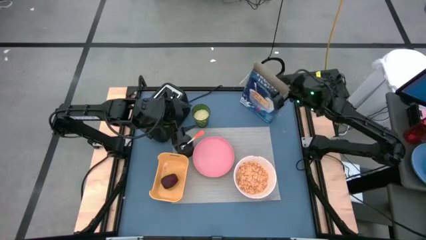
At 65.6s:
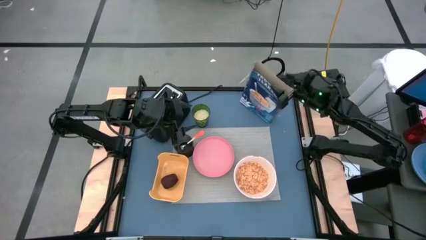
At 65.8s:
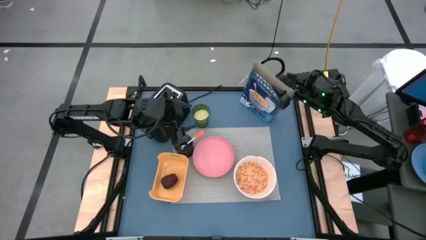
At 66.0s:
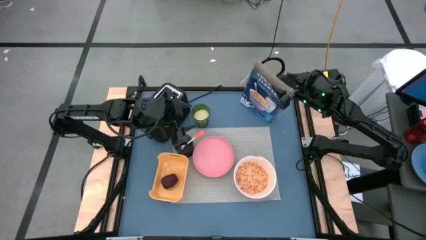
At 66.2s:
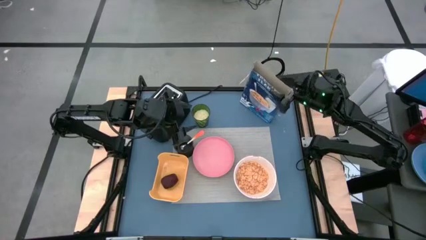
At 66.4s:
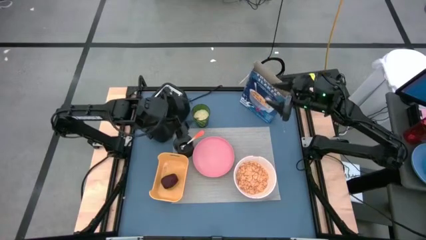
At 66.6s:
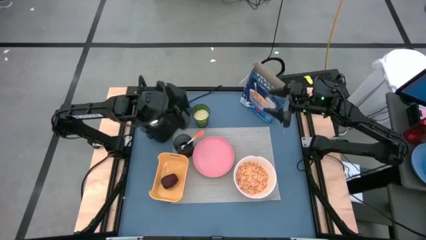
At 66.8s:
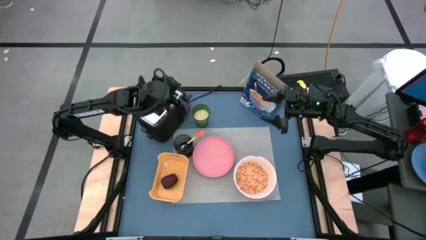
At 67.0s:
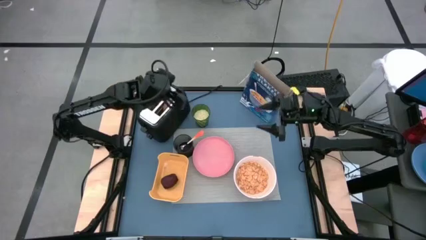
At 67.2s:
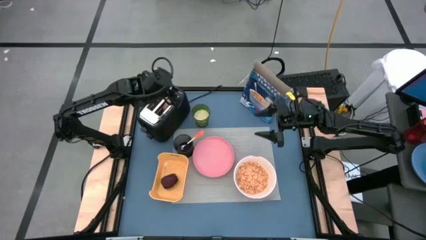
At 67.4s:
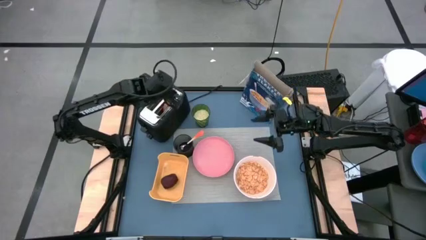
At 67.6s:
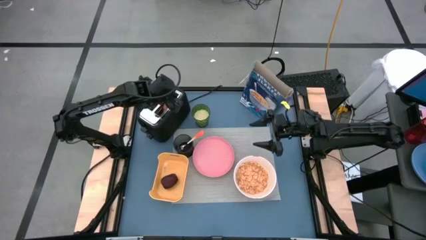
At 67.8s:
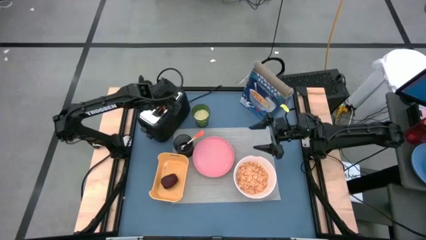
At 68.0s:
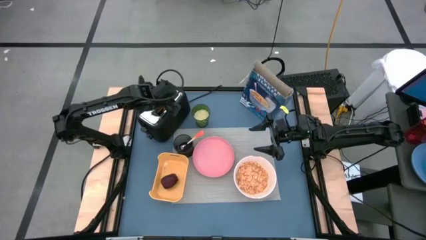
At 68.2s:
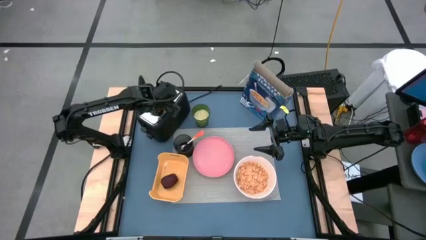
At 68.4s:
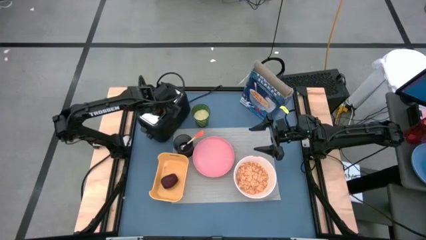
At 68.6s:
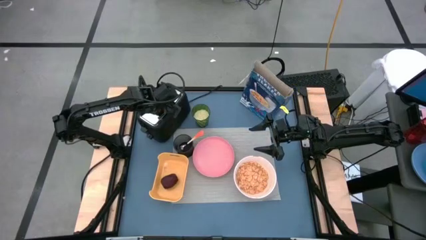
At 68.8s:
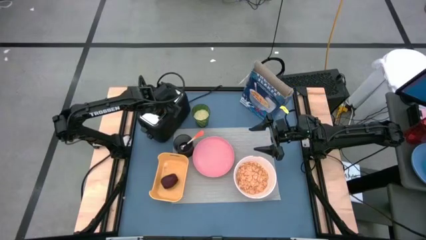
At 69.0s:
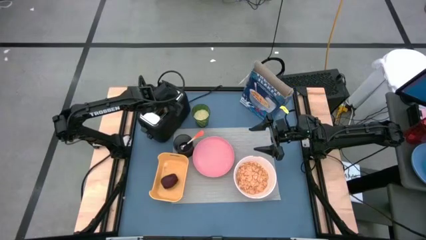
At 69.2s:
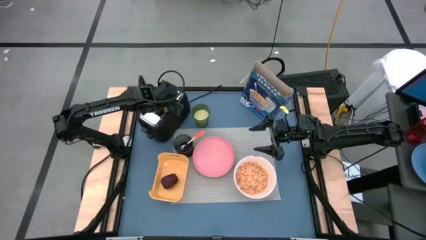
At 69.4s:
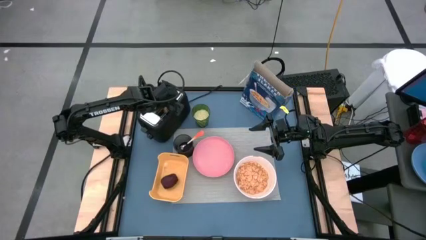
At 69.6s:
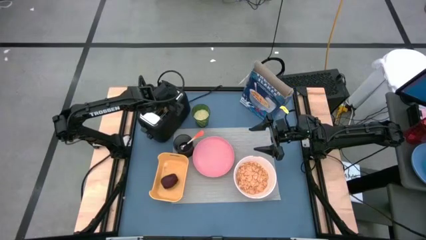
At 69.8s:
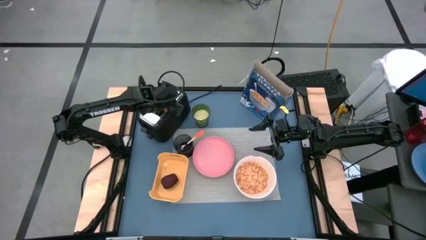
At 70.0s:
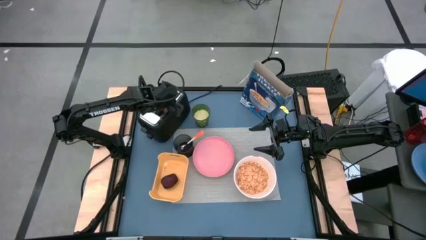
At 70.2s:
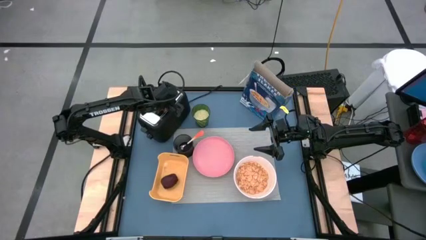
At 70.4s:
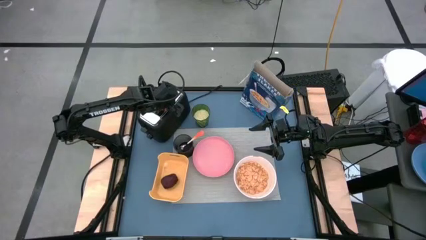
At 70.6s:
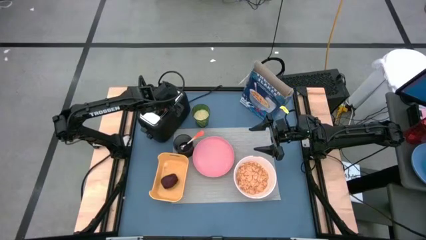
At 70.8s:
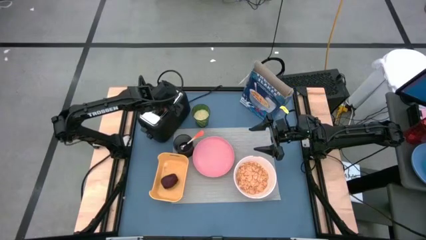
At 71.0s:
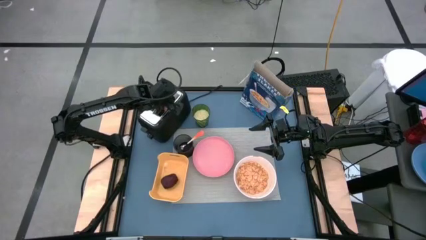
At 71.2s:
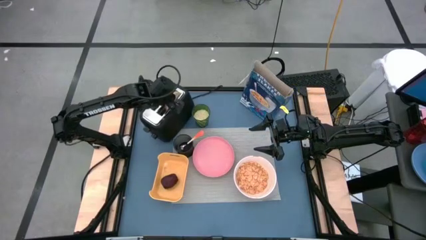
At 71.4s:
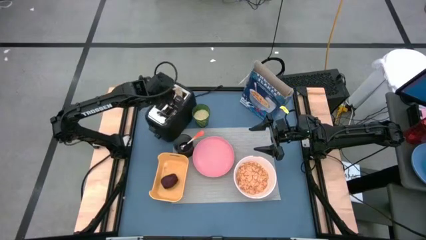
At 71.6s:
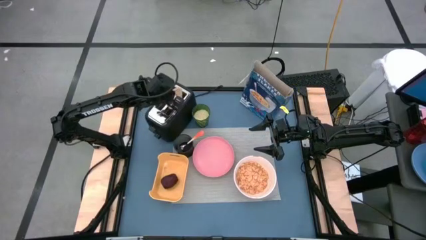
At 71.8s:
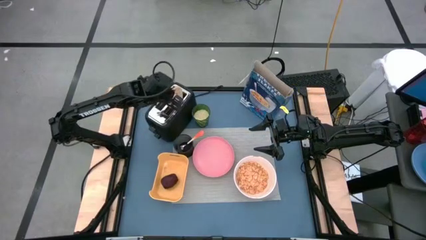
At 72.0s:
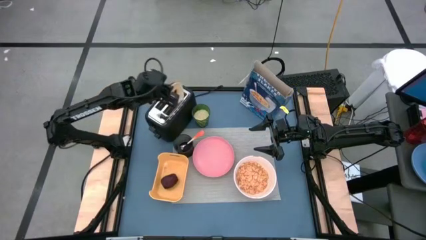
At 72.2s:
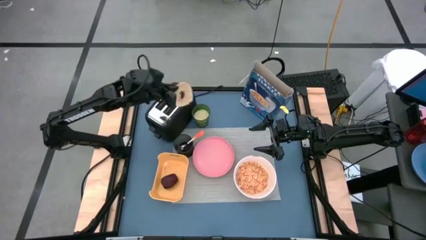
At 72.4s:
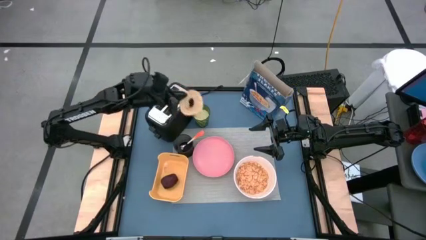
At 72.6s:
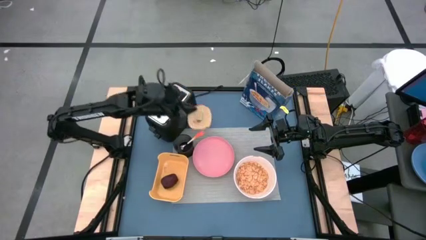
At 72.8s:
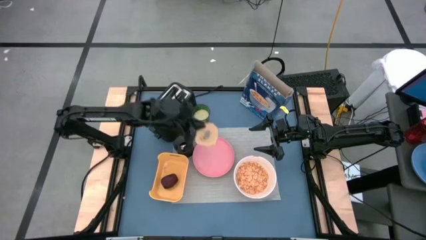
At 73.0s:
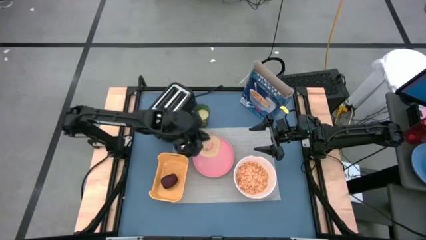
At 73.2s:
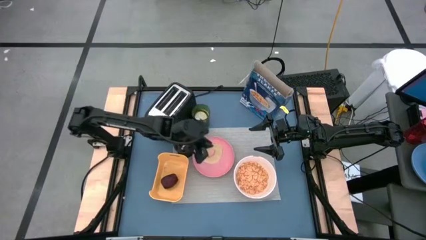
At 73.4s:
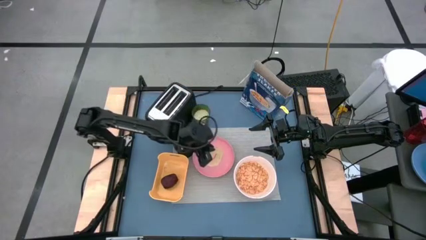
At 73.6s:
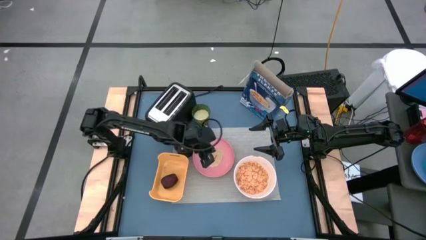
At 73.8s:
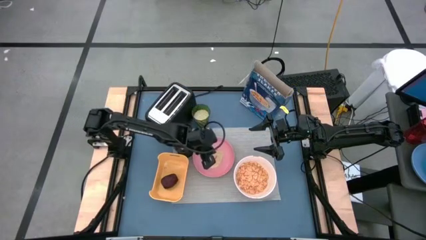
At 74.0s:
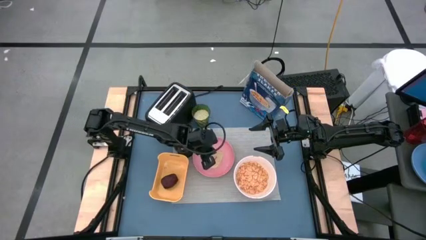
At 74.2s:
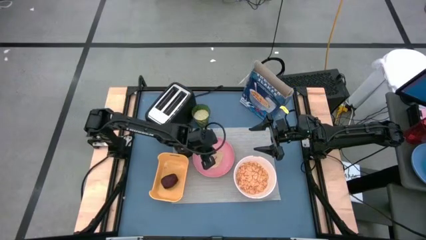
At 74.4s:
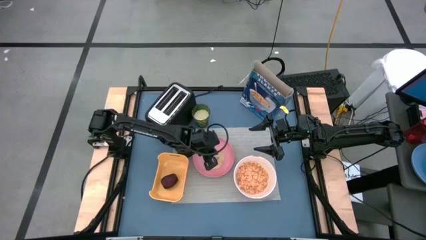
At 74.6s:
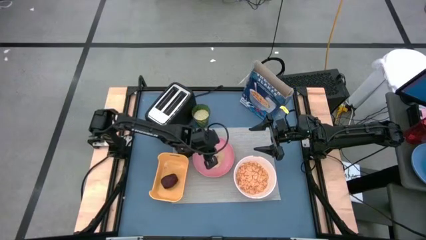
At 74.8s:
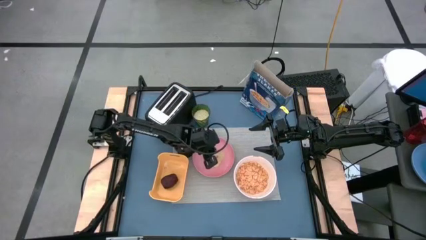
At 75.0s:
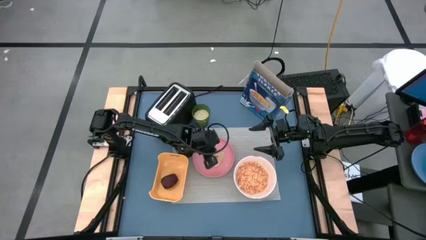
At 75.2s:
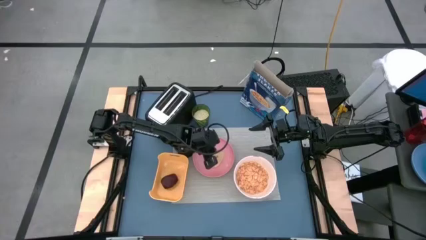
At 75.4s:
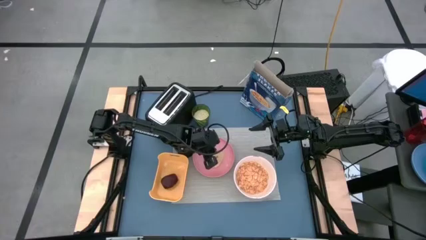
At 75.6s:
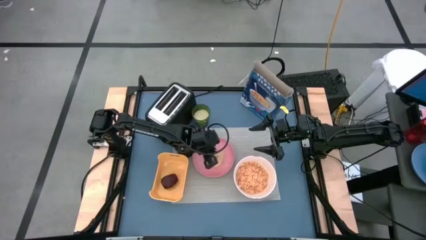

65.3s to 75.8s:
Task: Arrange a breakfast setting
Put the bagel on the pink plate

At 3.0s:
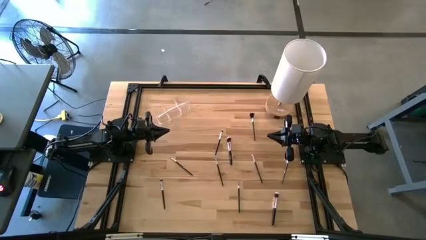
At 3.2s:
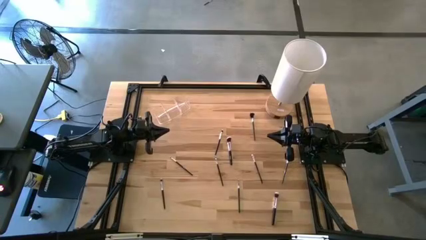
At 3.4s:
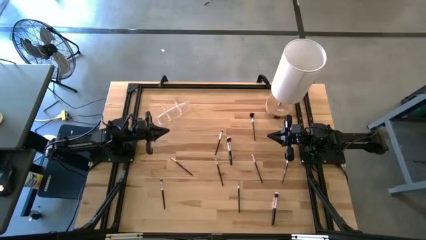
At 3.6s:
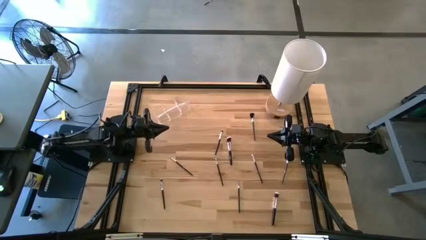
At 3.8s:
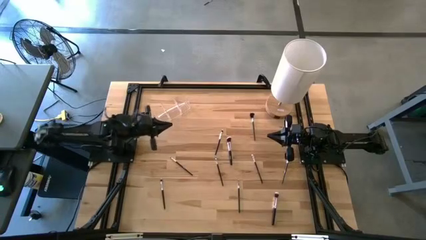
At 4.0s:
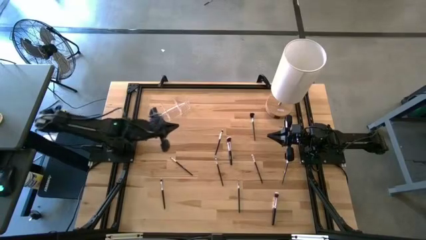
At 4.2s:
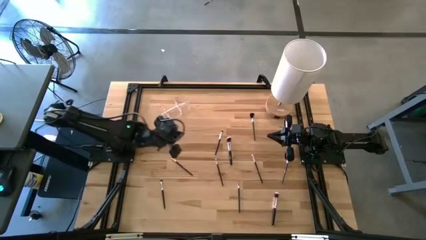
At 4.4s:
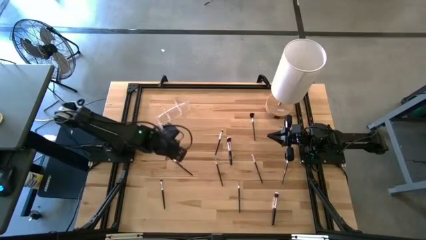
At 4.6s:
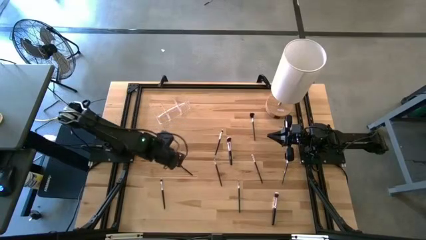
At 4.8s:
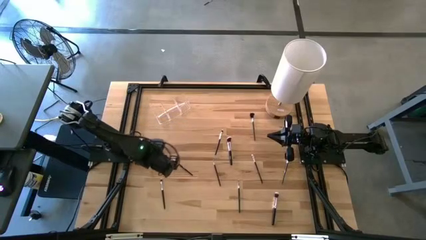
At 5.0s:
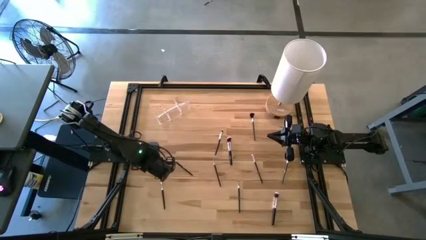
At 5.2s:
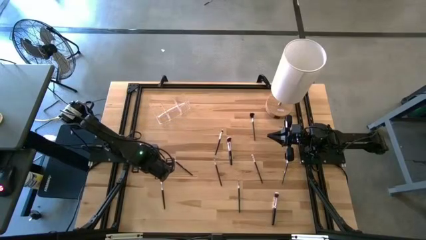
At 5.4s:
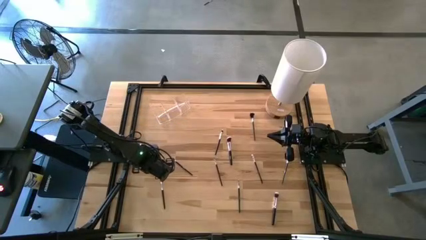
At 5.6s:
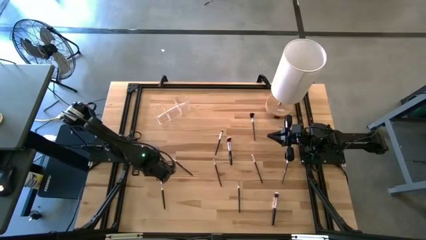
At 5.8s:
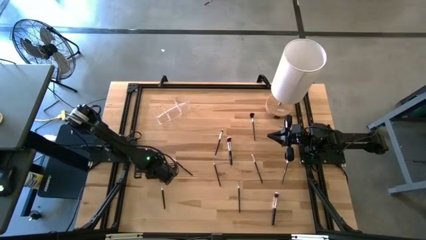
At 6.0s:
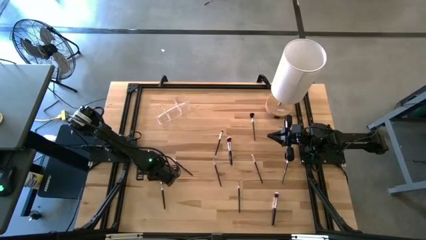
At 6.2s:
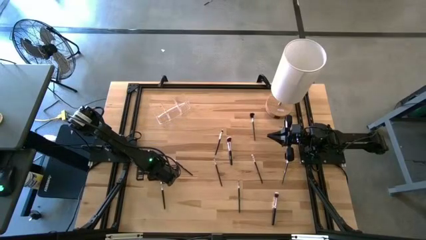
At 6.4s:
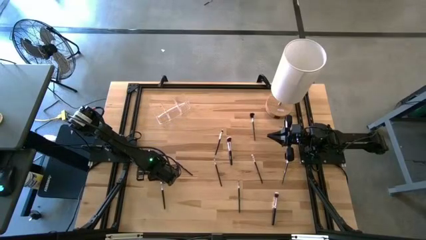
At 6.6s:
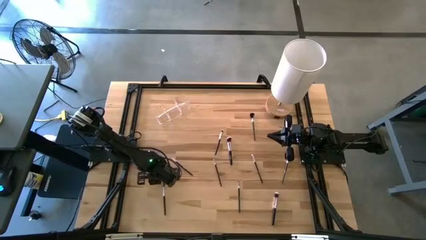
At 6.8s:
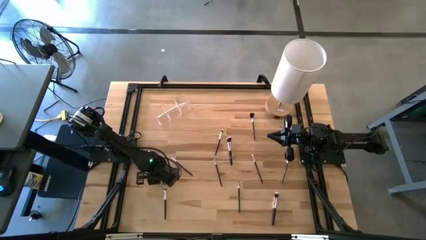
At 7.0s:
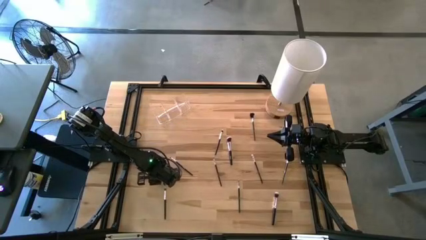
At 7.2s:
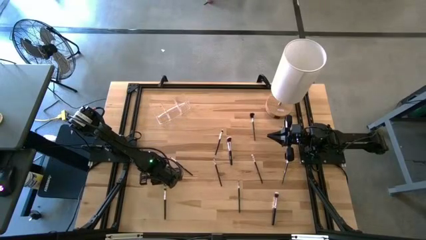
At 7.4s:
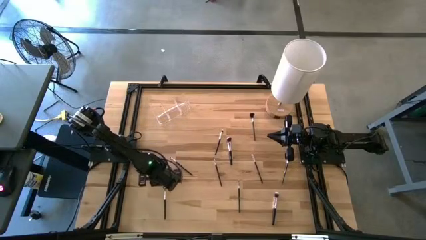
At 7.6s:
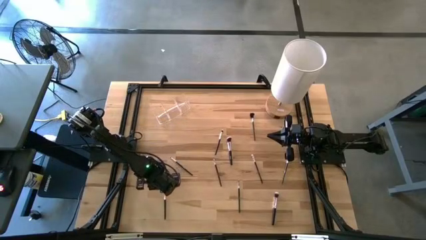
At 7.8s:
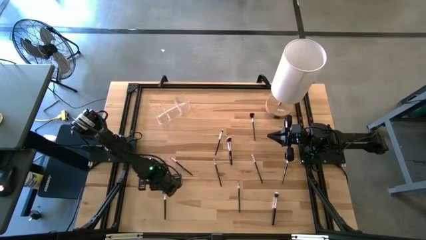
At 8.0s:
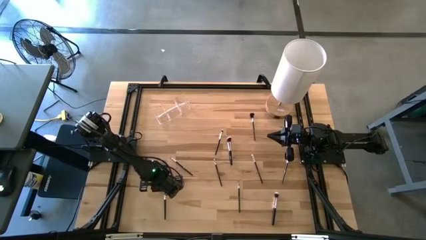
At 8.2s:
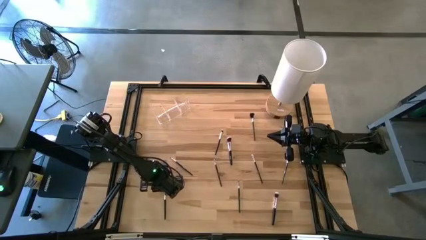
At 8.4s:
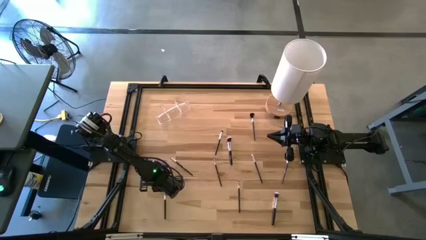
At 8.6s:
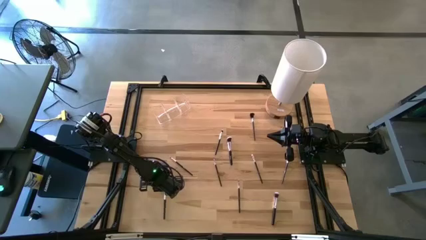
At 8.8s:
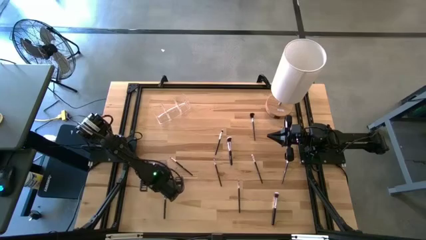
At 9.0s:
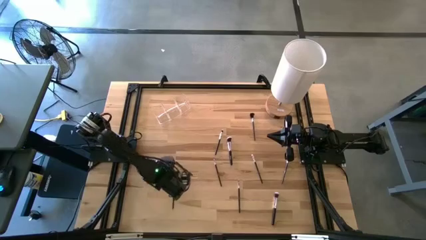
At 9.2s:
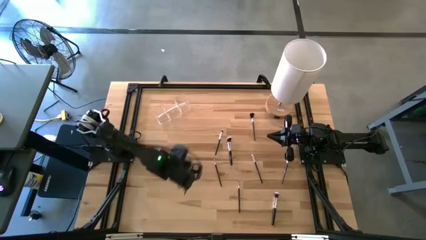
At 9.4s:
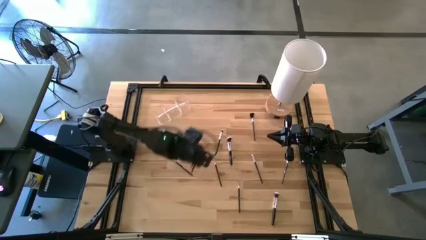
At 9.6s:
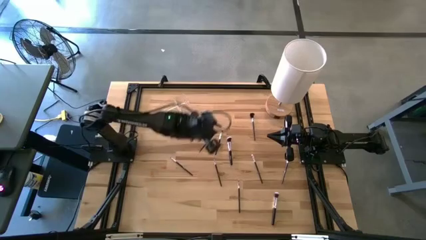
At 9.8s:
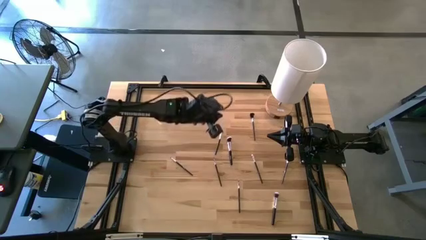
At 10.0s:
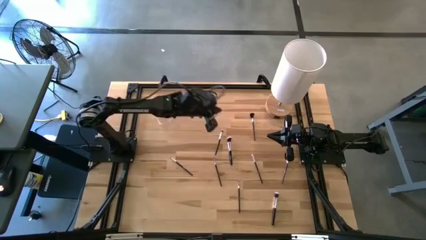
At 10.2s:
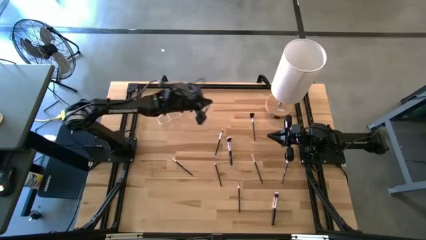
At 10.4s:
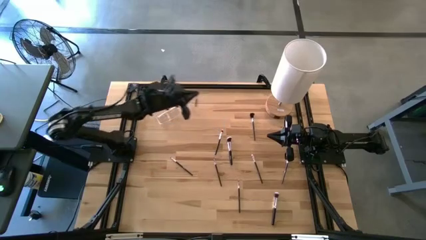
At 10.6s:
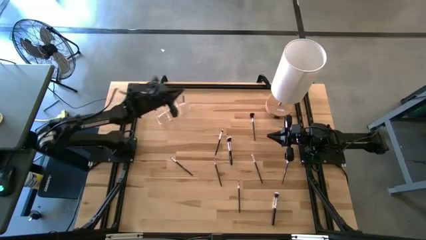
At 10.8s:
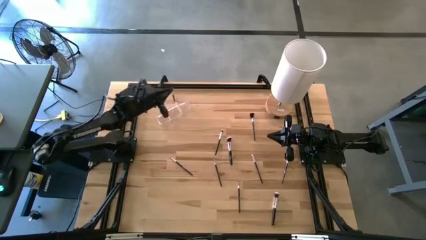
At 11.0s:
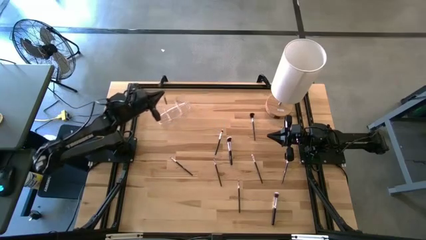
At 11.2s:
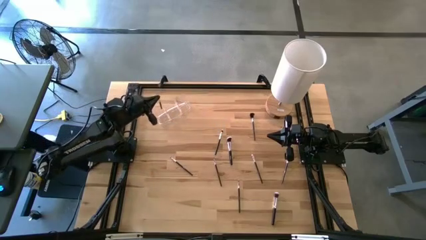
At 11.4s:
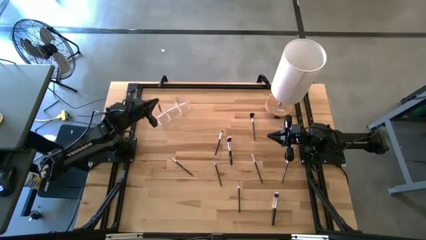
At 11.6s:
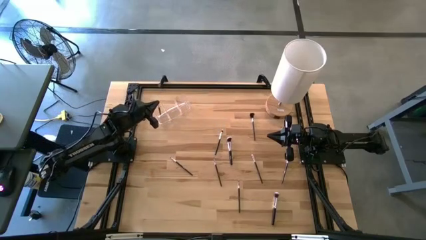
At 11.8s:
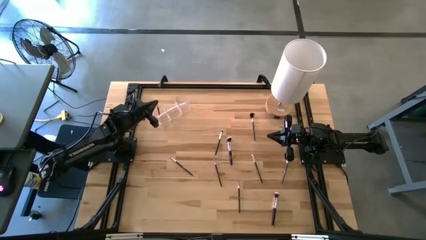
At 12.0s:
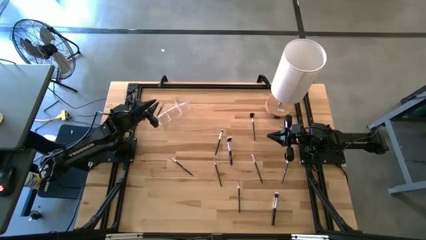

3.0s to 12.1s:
Task: Put items in baskets/containers
Put the eyeshadow brush into the transparent organizer
